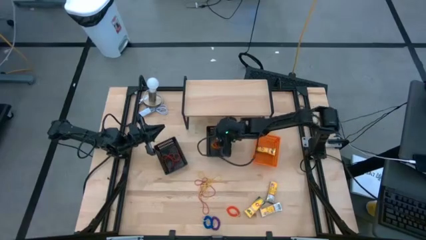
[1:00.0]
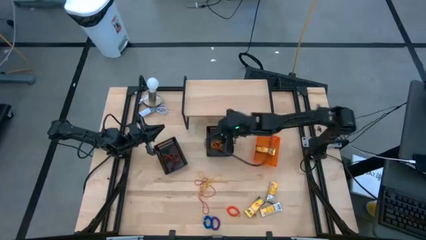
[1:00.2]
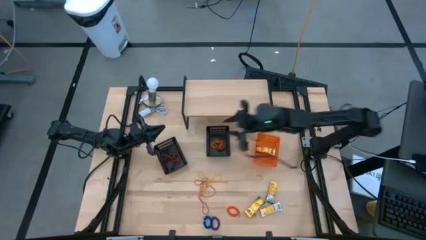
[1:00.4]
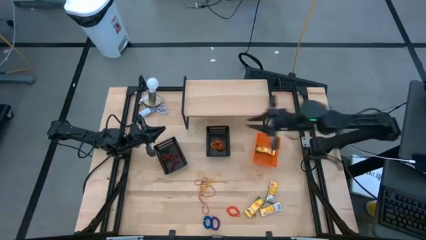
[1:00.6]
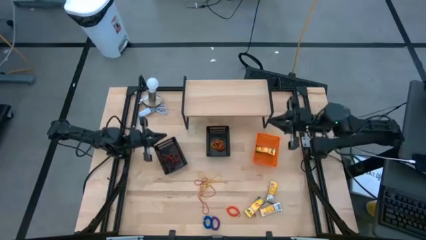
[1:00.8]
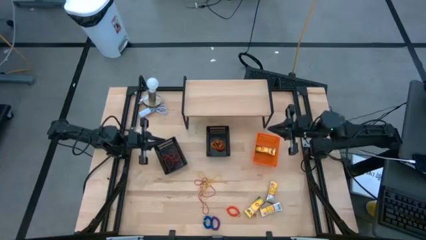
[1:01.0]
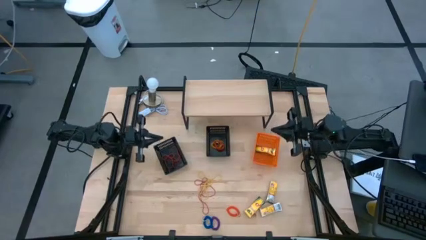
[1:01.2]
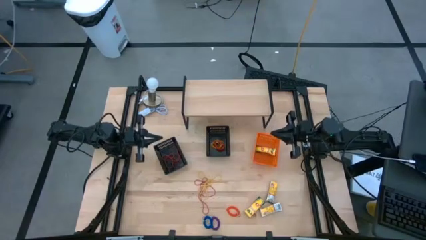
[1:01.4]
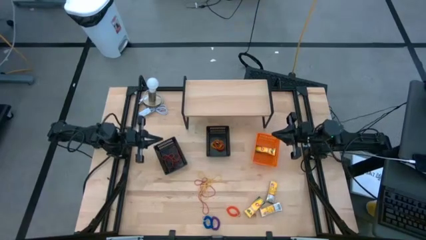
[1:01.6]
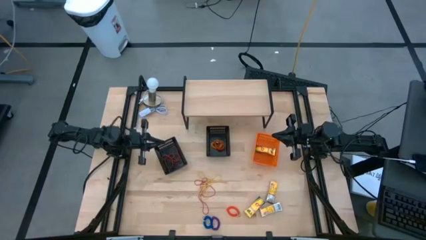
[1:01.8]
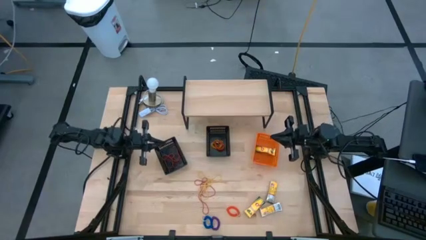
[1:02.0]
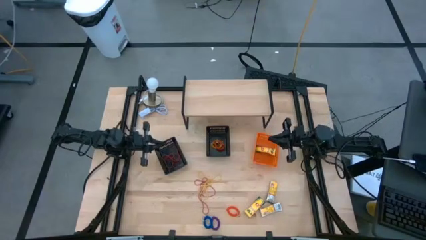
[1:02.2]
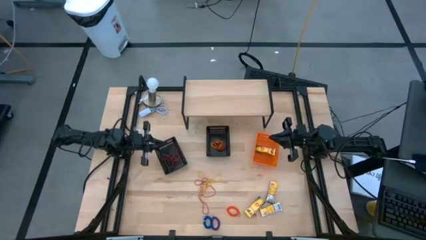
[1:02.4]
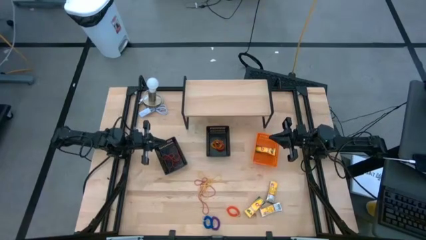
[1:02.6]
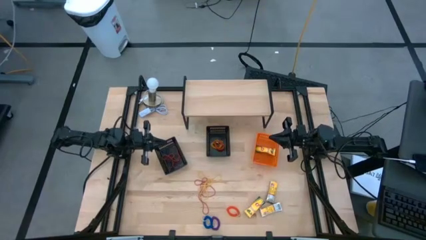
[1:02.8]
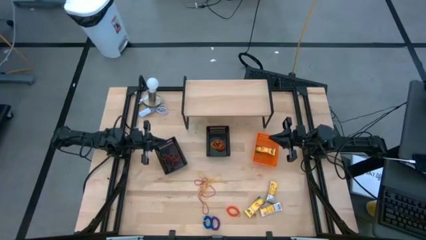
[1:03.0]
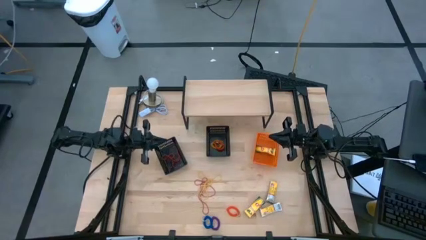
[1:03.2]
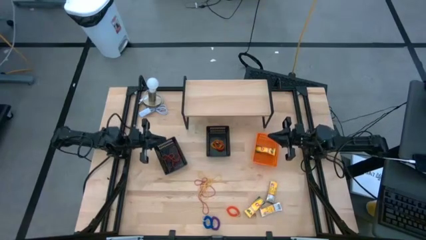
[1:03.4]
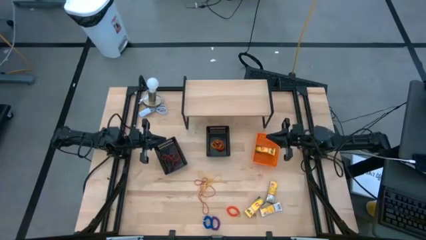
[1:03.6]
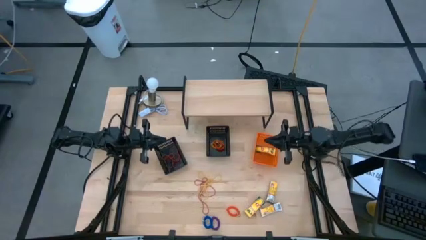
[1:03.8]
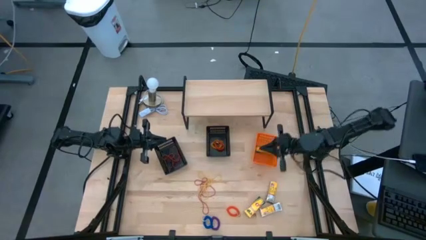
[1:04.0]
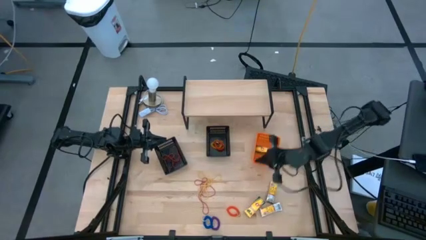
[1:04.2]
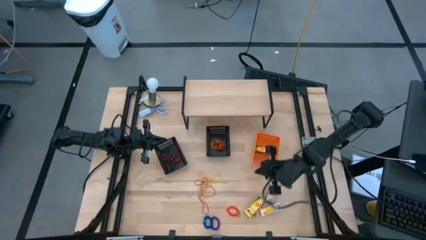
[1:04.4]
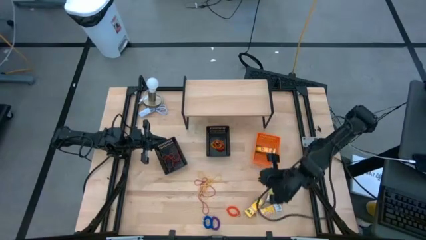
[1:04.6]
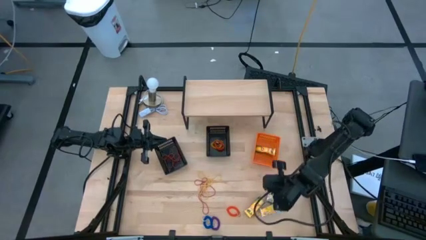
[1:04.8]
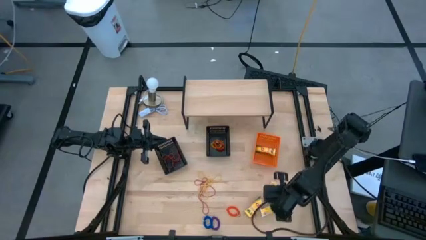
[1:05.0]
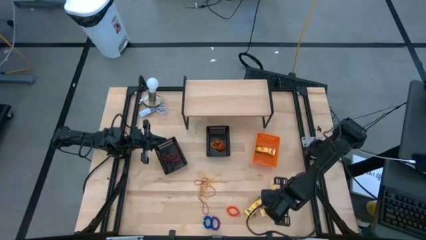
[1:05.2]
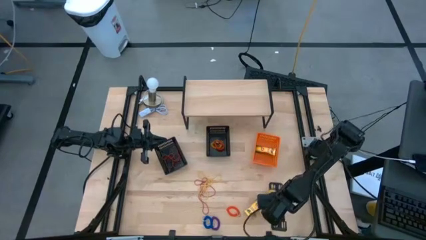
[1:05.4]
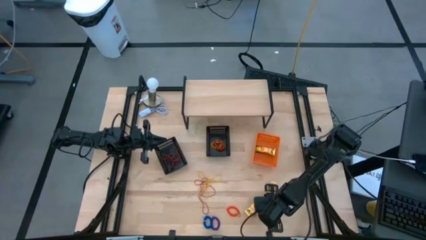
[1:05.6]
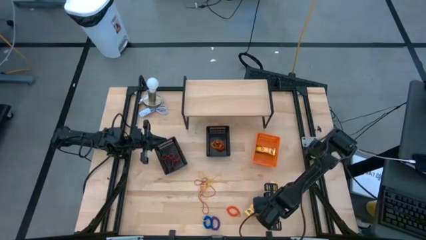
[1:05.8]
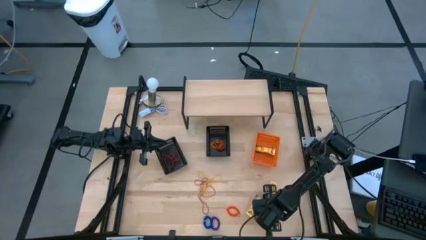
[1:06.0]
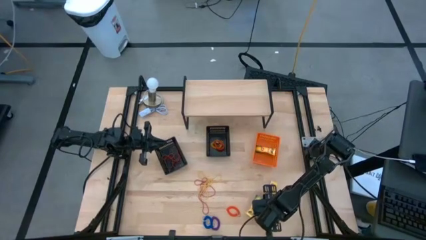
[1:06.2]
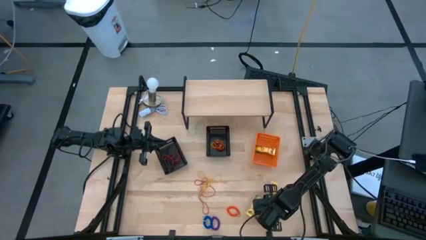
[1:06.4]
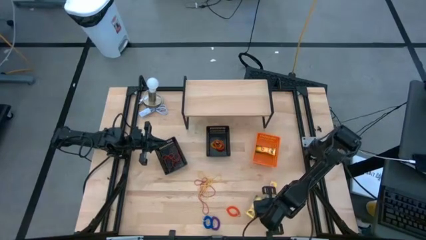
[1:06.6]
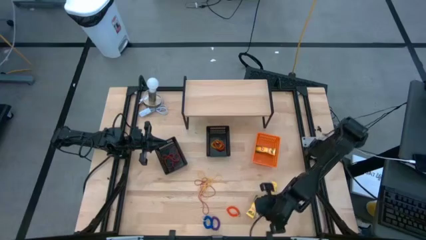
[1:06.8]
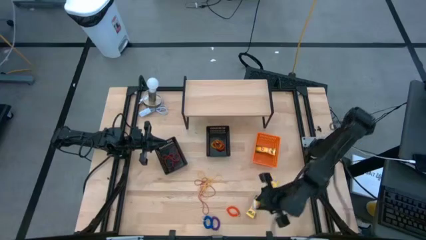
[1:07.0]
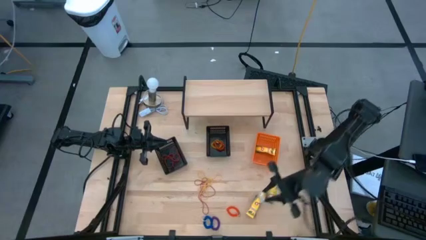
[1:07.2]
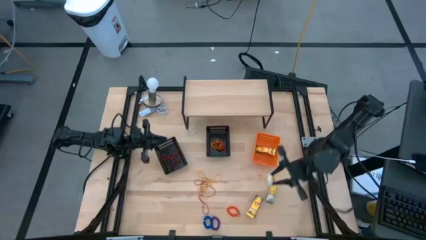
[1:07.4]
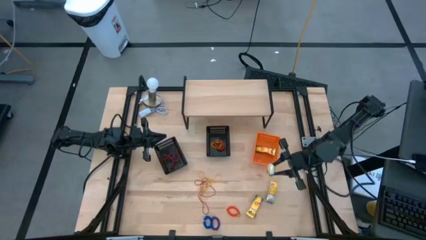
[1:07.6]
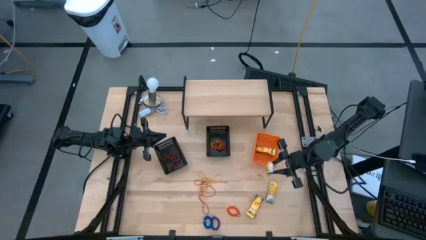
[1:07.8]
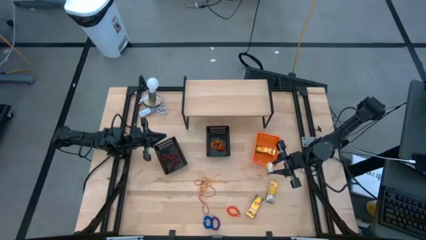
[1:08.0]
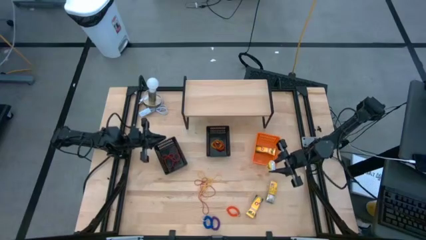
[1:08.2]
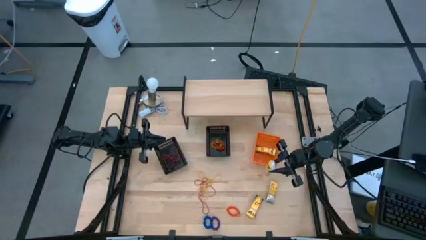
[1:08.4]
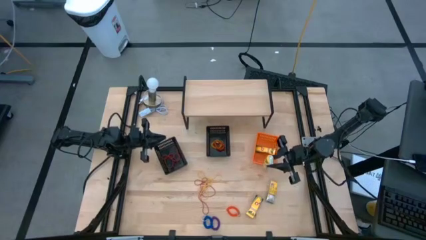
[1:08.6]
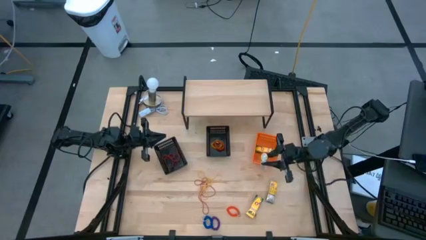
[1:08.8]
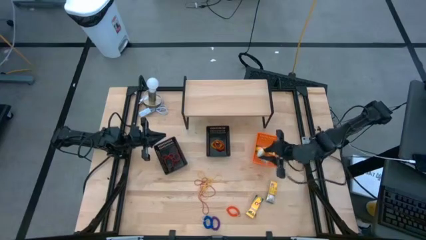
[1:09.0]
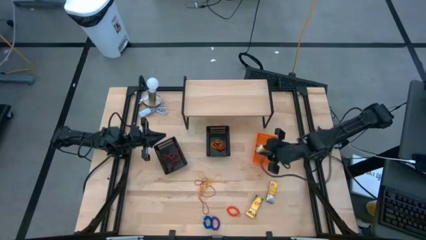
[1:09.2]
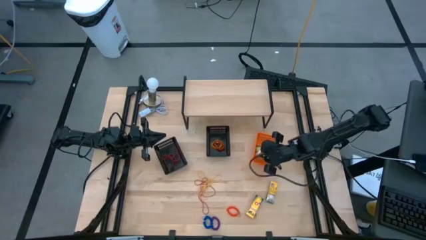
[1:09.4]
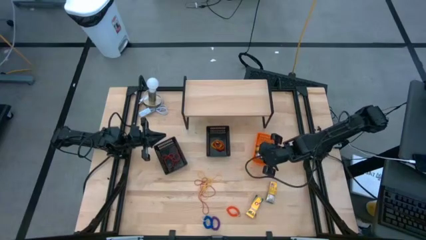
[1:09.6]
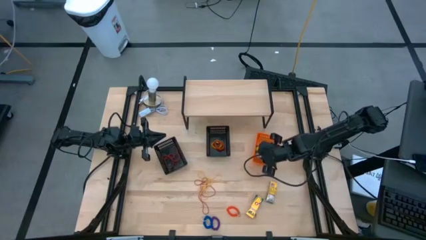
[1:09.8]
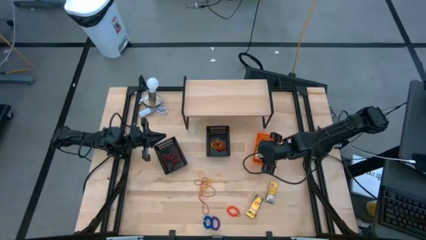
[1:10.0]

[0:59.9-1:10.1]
Task: Pick & Place Office Desk Supplies
Put the crayon box into the orange basket

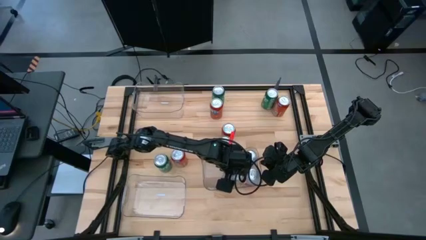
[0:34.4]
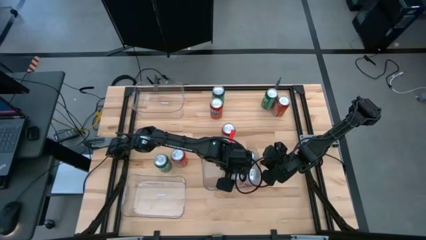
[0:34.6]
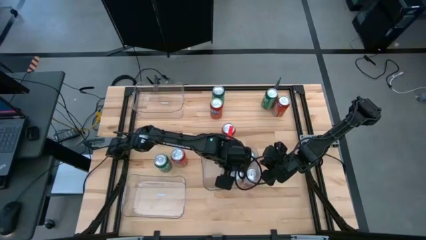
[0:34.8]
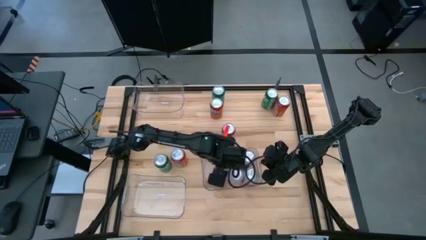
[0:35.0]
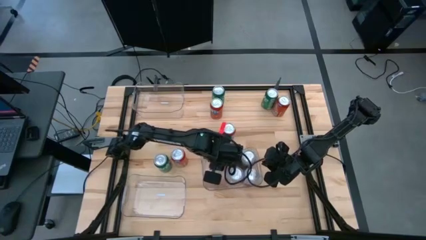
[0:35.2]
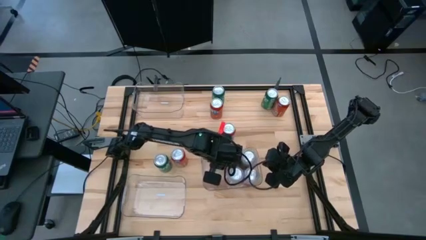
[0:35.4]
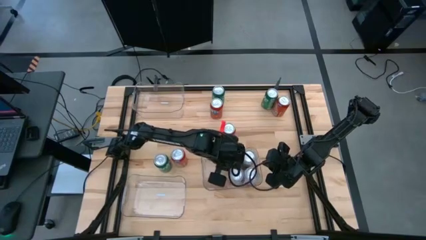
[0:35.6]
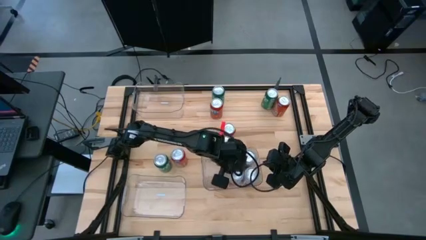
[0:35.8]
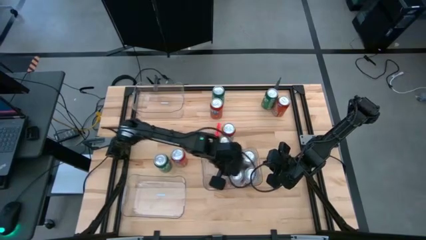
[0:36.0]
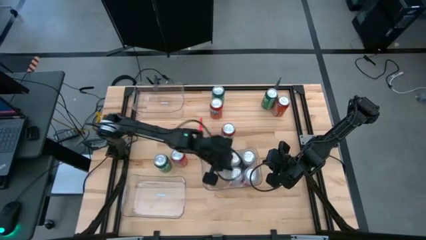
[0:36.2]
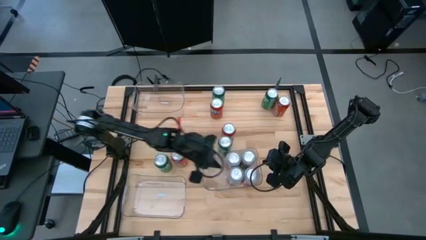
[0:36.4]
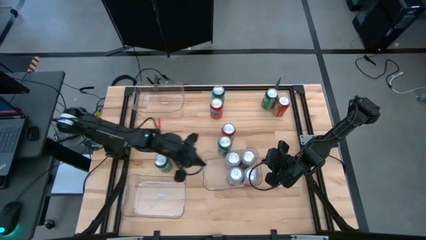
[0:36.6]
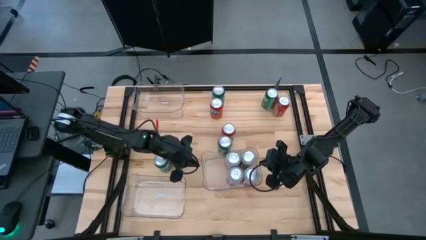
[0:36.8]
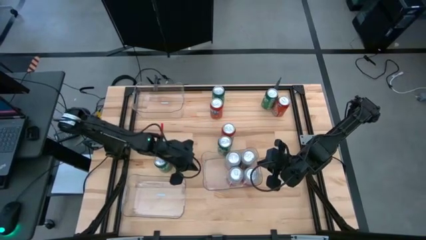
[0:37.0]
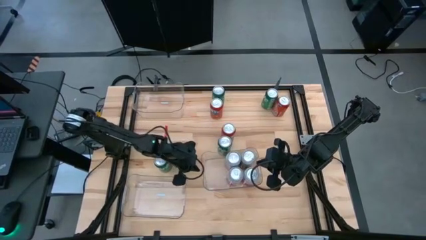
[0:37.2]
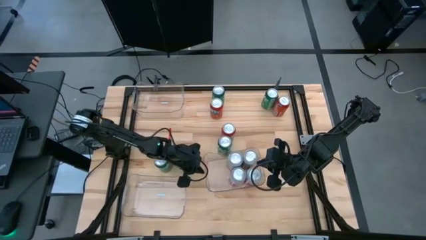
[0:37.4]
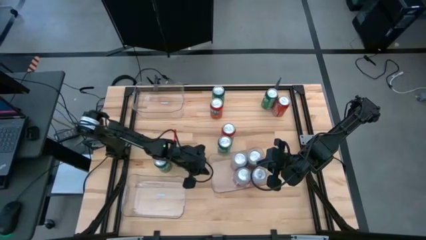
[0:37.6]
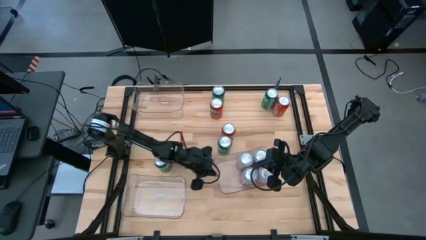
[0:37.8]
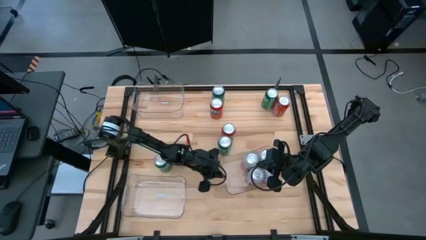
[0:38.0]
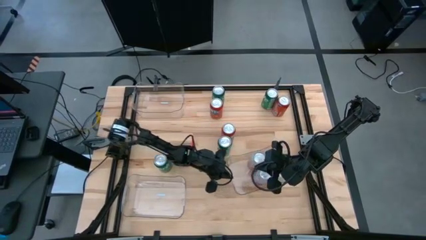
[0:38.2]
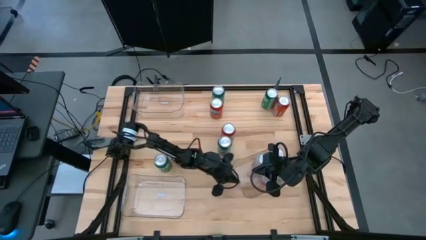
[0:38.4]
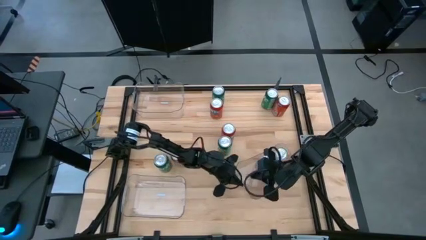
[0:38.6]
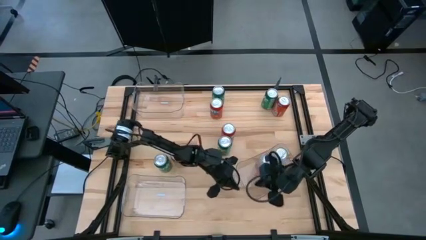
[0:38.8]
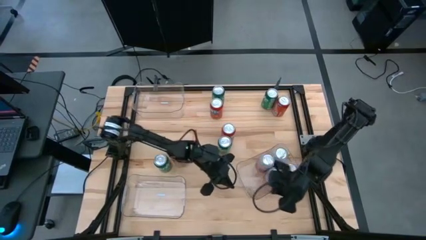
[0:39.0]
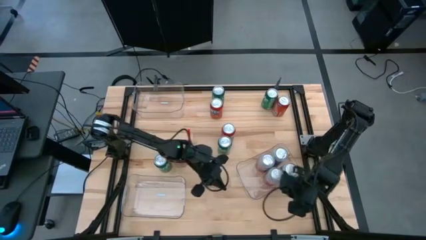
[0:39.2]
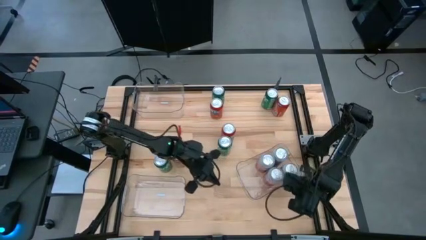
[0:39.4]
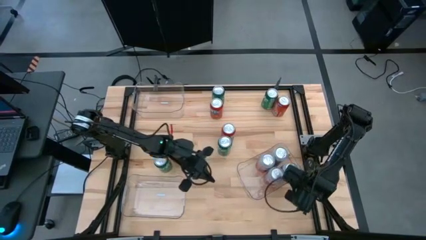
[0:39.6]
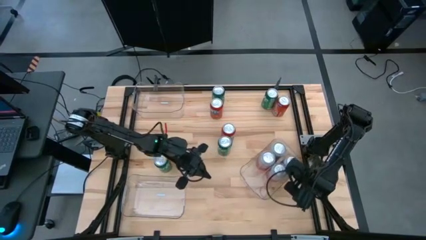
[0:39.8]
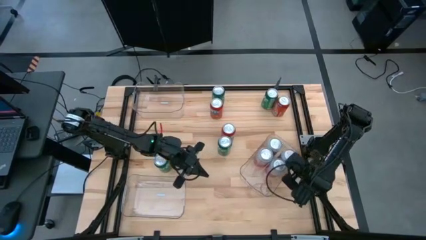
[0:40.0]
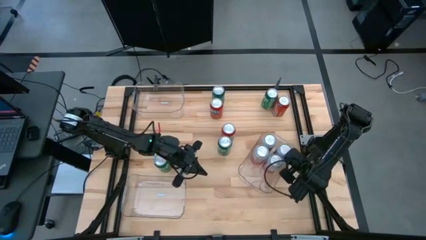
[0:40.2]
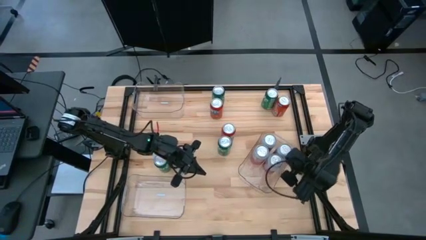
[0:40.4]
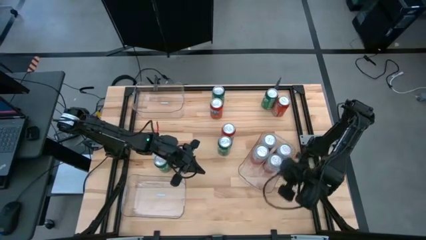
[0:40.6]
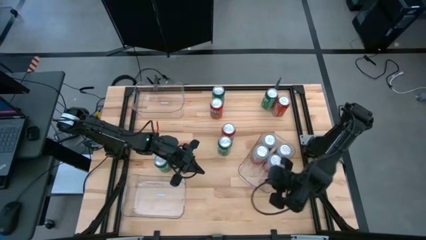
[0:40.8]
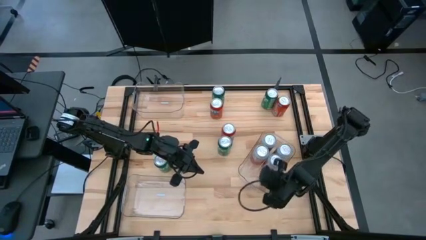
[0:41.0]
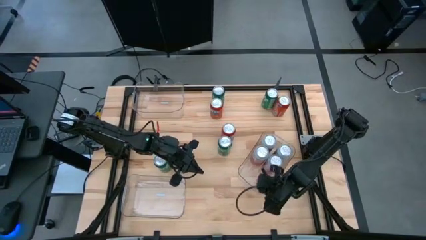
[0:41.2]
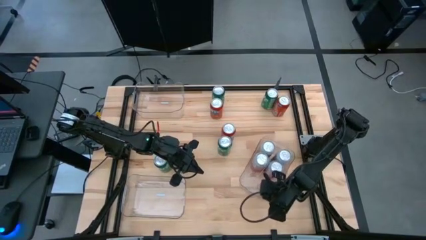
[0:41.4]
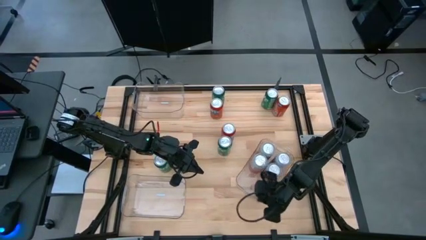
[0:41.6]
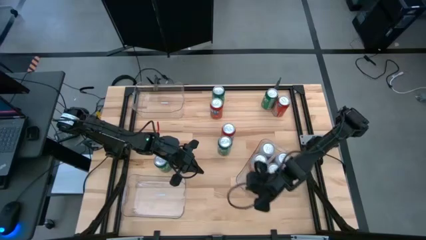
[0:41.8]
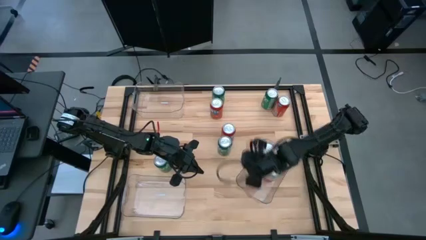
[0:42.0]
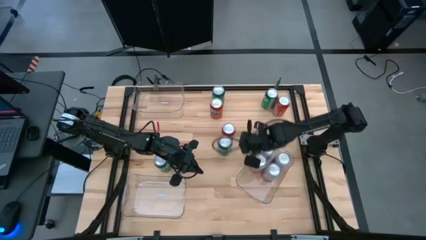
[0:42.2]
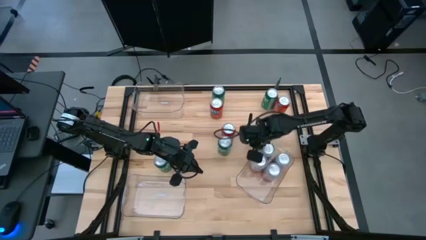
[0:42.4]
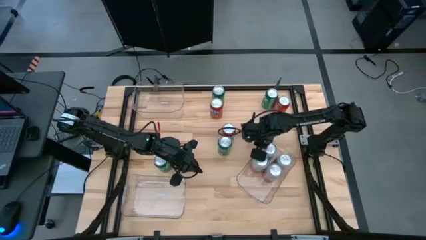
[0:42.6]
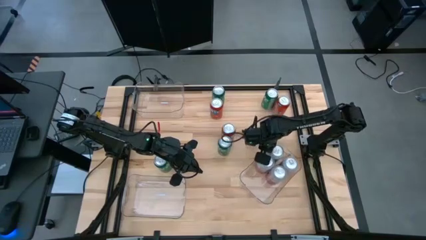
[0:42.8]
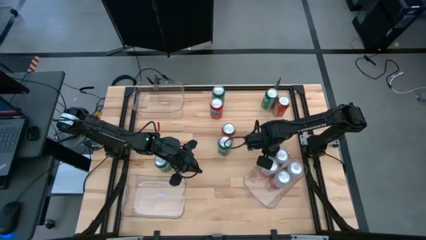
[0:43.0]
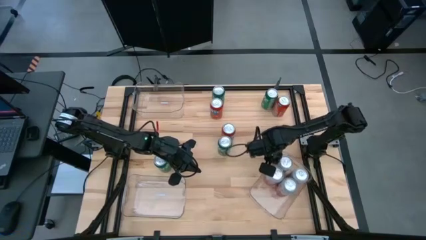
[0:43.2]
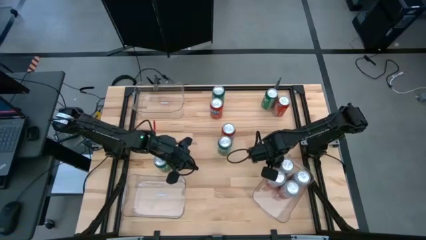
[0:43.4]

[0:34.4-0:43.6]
Task: Sort soda cans
Move the right transparent bin
